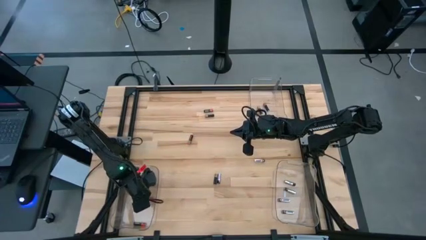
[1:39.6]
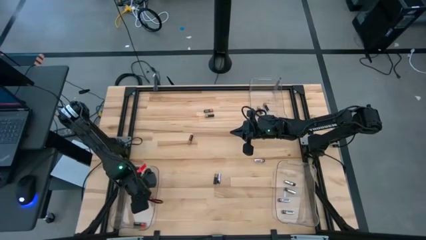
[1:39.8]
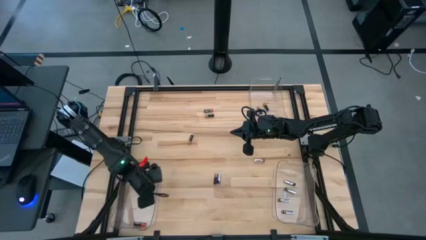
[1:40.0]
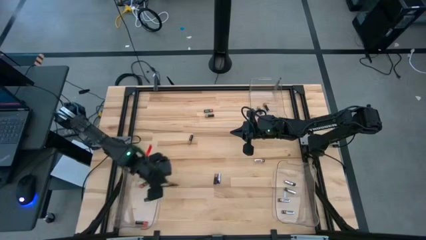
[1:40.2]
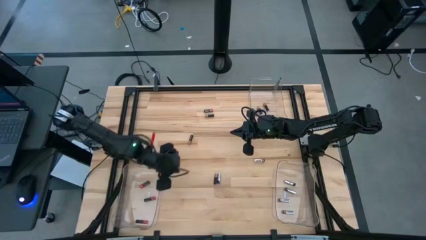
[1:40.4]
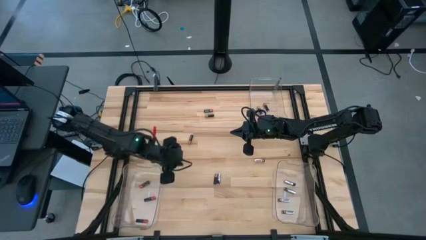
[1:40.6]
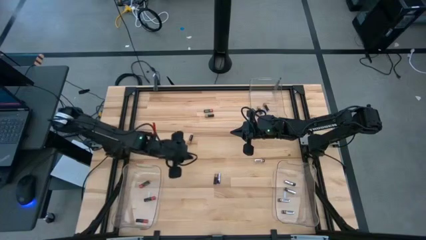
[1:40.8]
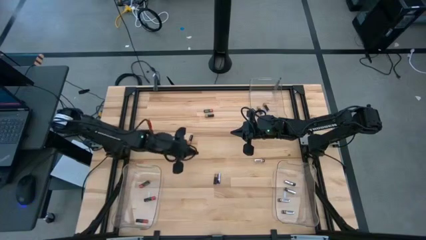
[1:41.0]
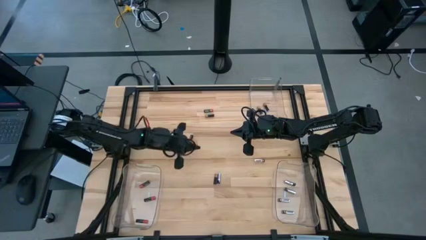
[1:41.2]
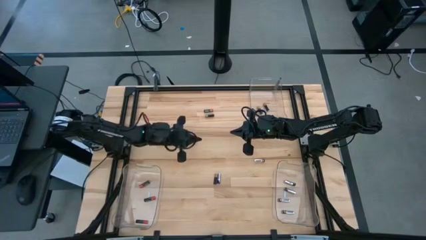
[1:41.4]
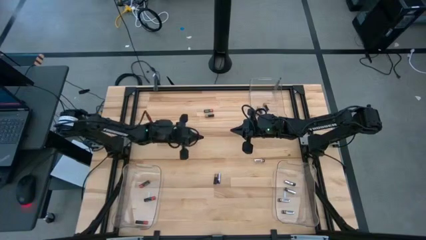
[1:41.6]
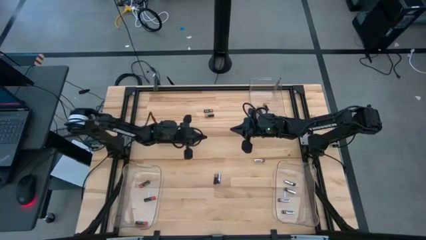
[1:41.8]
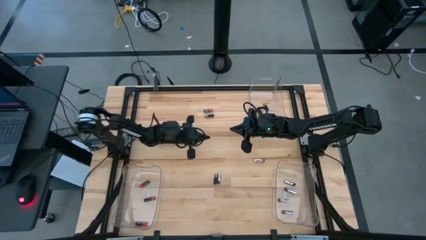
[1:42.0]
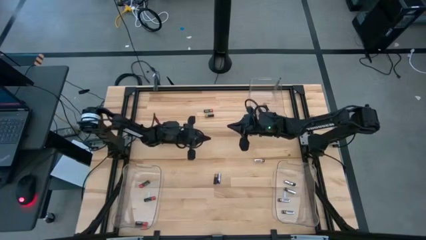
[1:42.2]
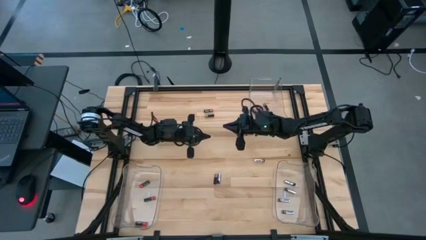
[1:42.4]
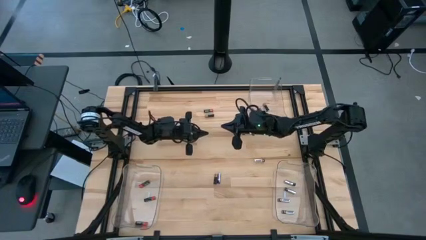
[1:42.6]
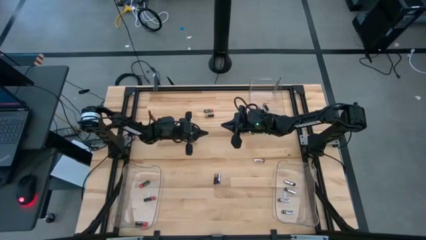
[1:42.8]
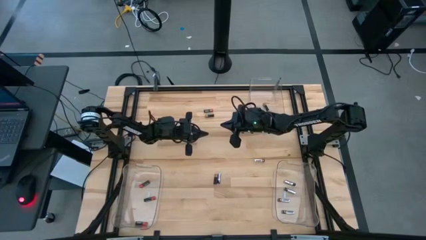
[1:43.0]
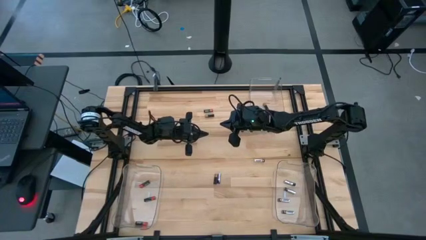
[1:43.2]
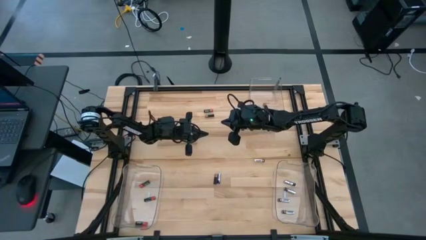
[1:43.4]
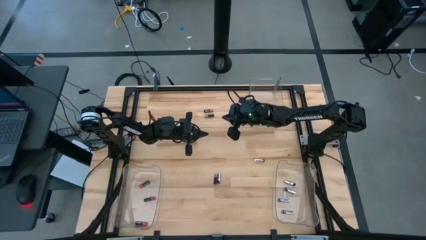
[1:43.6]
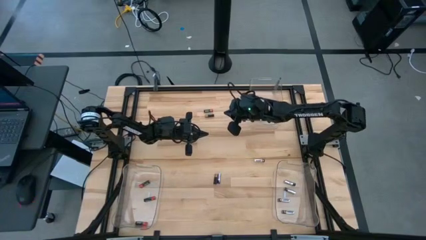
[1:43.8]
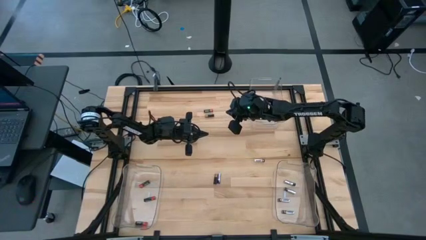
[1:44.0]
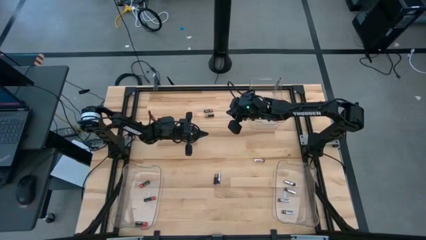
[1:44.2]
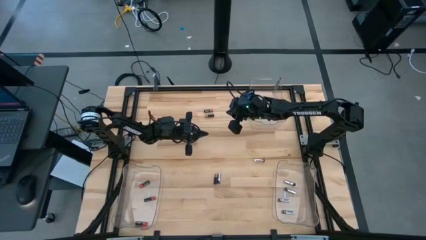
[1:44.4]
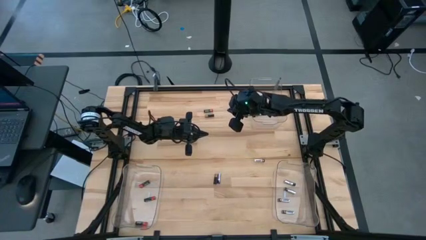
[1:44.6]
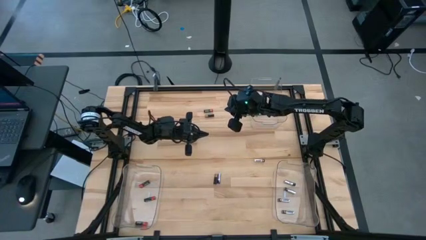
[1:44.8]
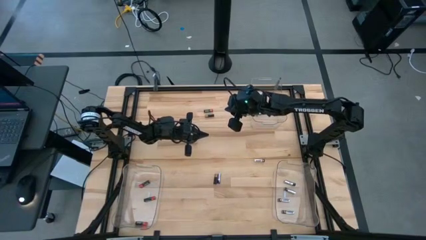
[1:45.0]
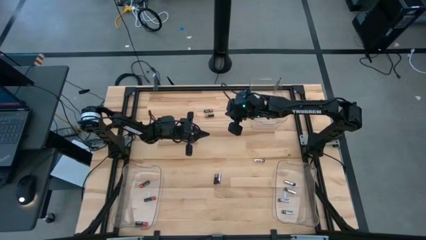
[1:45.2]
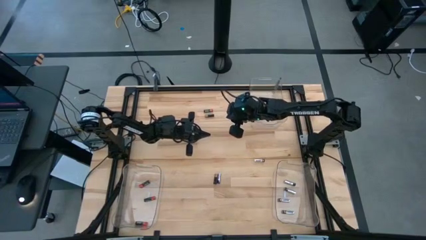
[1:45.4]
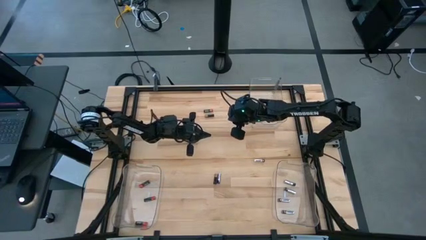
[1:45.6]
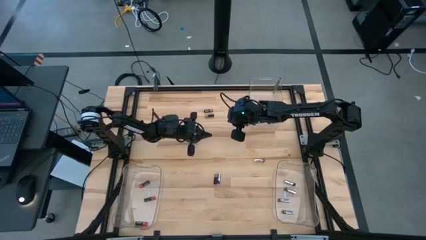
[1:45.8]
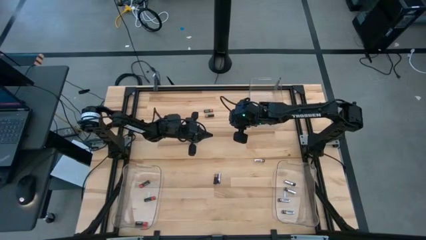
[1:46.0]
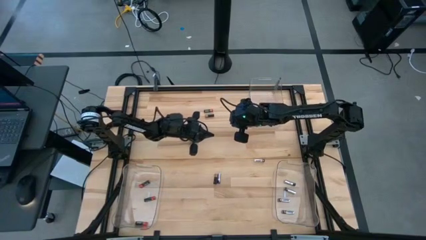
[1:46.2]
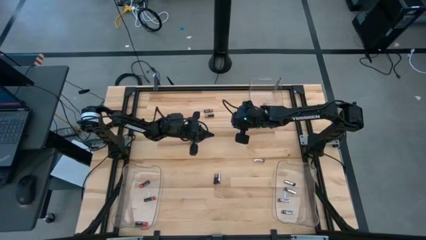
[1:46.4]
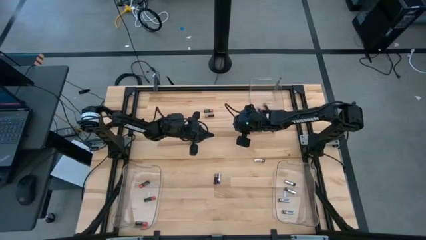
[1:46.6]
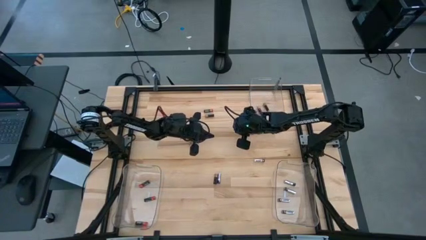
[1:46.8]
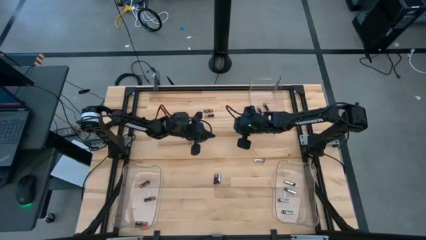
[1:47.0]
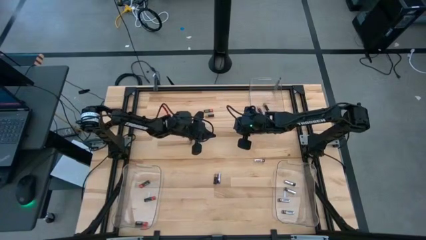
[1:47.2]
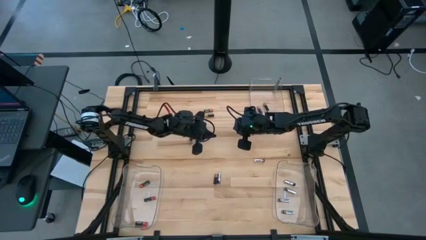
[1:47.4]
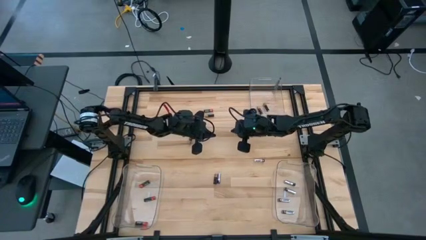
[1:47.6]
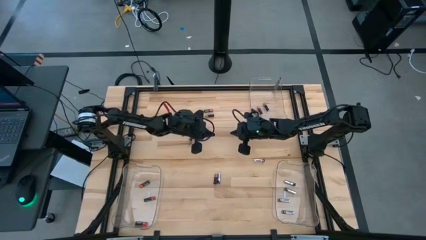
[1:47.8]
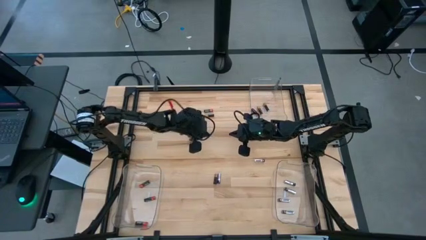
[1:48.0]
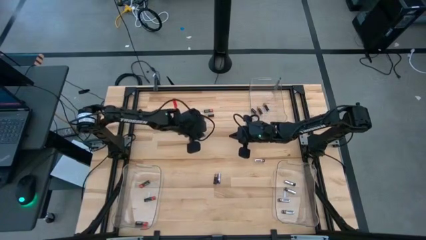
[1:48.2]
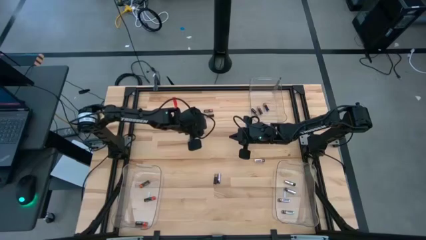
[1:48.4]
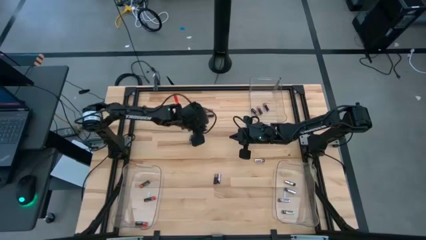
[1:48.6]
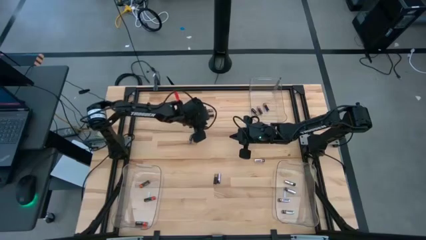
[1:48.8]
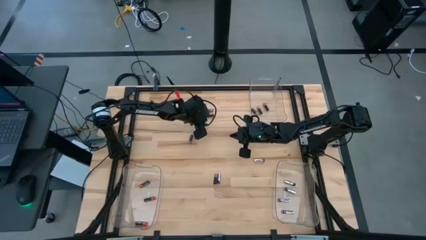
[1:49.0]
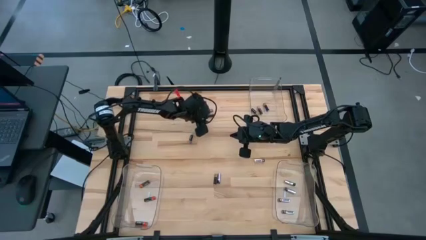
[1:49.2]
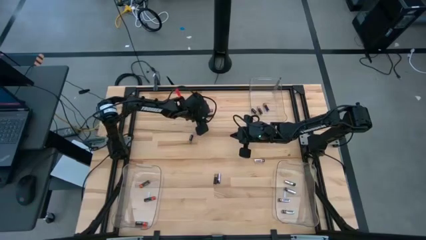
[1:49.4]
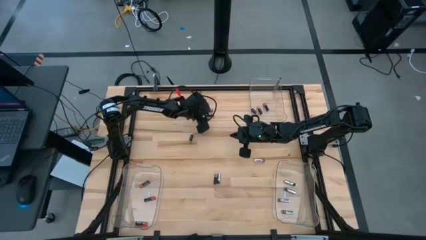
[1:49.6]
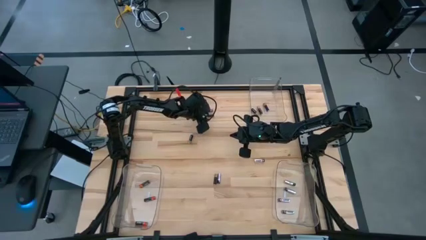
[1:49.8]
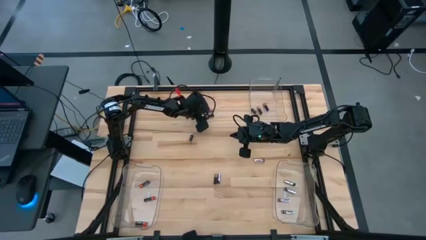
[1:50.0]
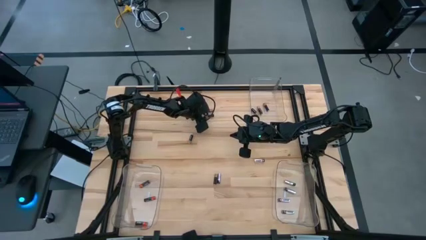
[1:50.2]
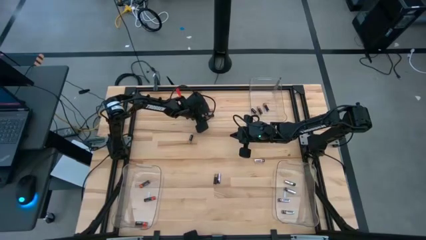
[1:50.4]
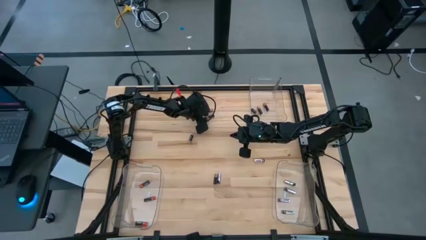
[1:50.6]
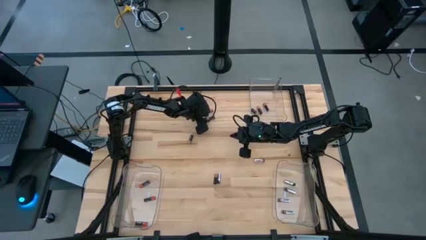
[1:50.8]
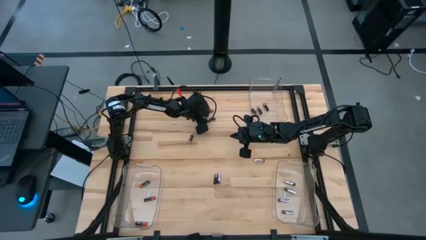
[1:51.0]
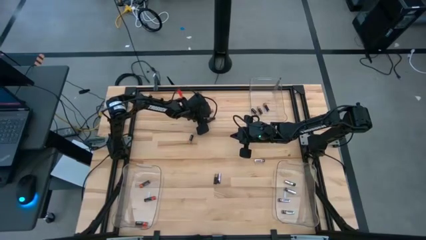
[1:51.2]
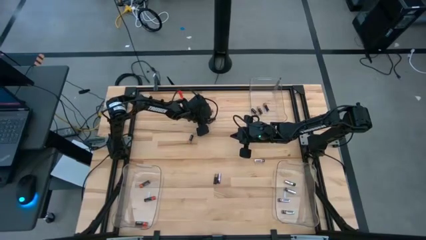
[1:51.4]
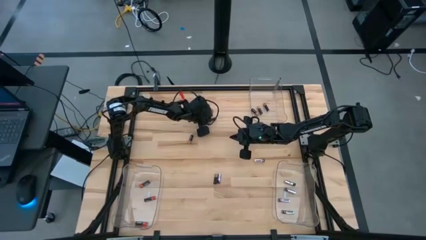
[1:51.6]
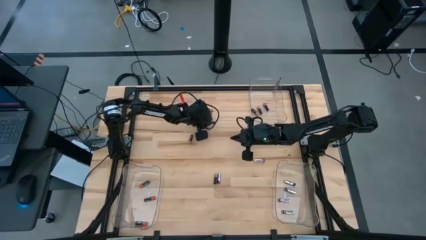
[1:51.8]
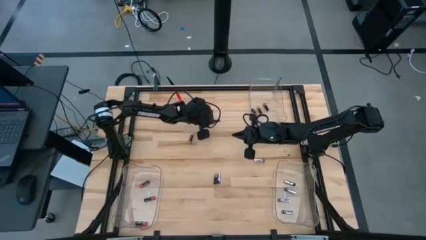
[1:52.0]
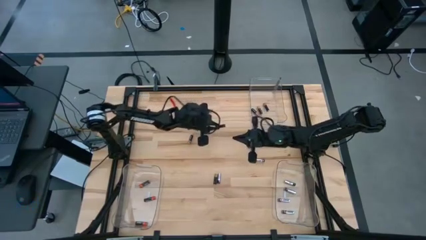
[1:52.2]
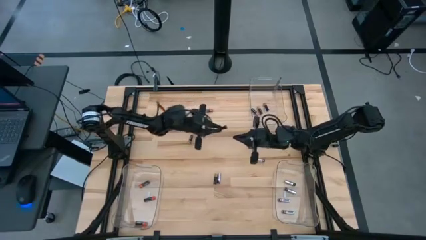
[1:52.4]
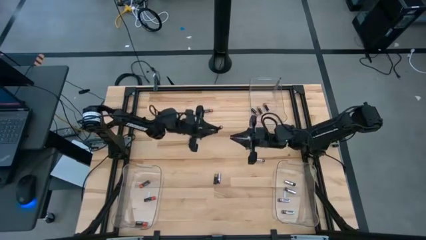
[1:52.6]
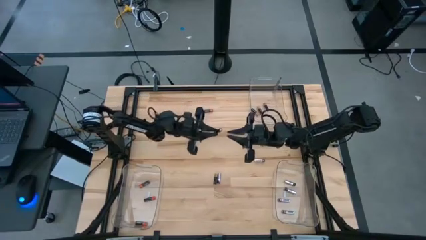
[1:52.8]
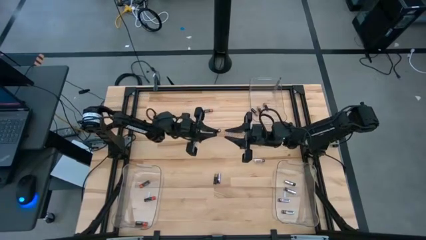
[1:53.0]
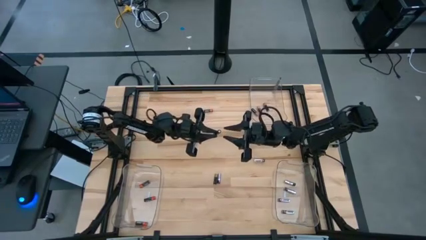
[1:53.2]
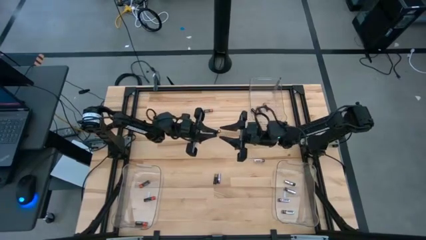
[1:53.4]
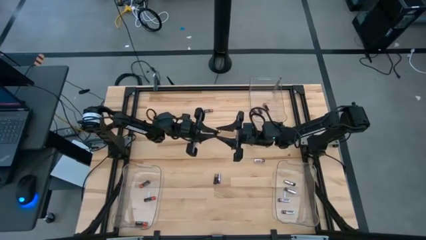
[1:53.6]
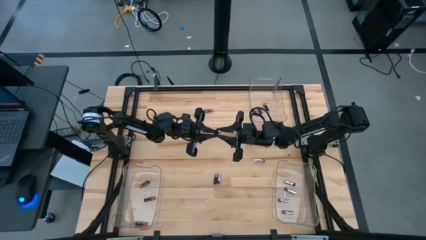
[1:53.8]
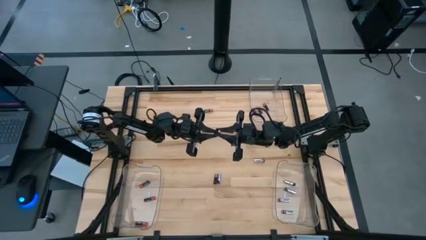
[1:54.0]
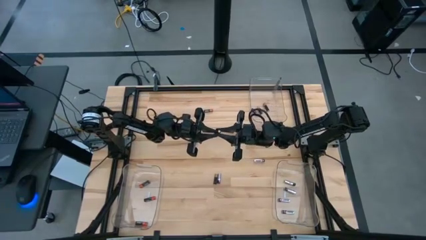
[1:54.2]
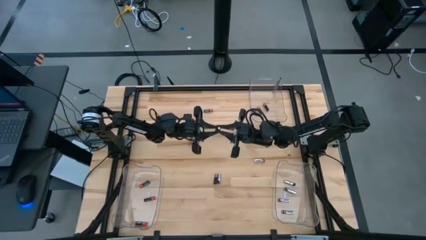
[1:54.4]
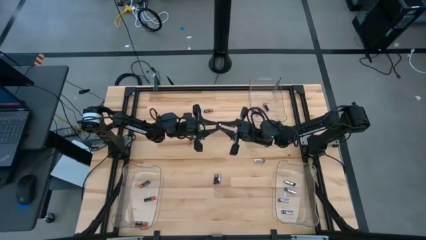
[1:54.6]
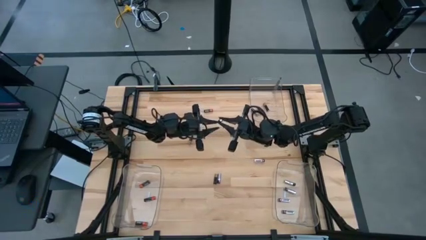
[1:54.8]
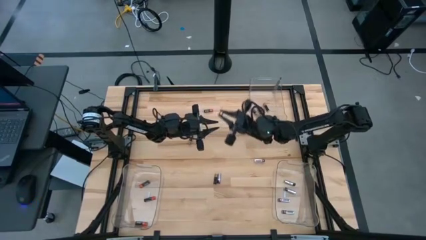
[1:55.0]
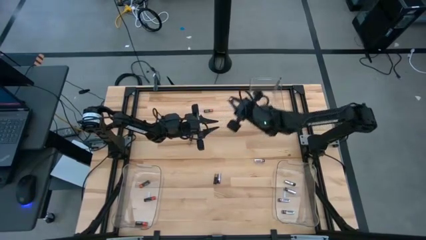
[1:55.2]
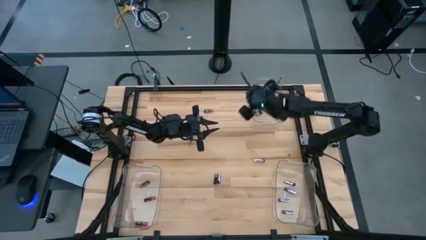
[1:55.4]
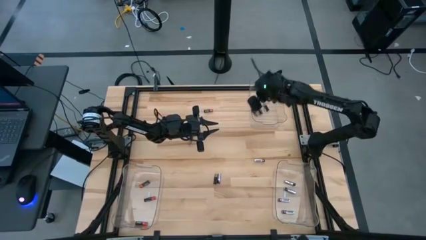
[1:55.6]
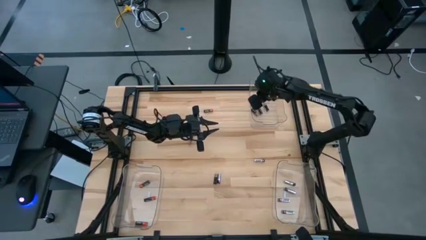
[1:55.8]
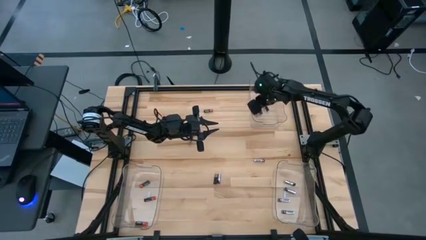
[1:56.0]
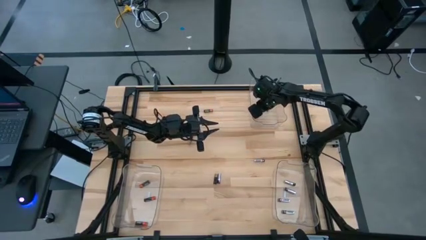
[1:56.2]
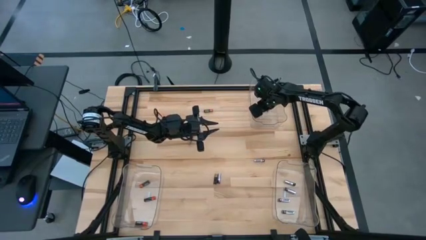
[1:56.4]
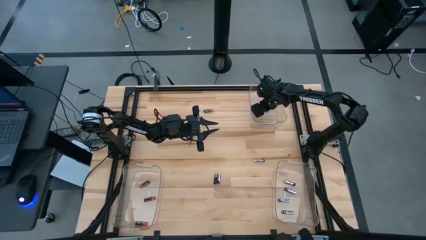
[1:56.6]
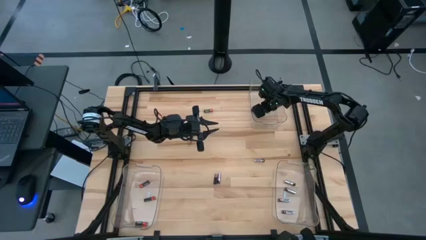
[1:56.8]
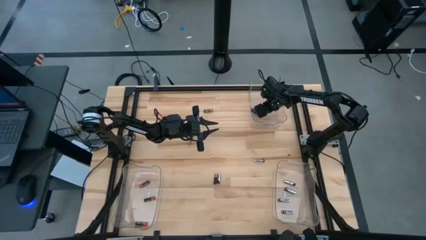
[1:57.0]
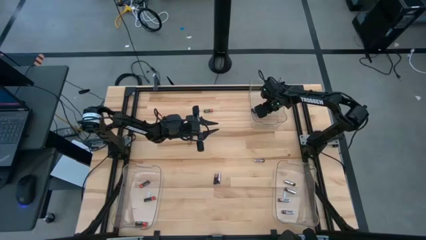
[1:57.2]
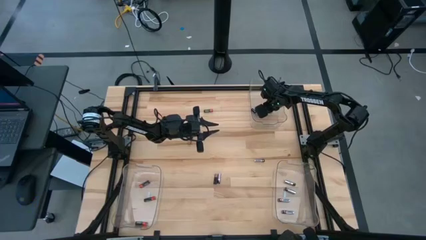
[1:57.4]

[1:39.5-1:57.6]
Task: Sort batteries
Put the brown battery into the top transparent bin
